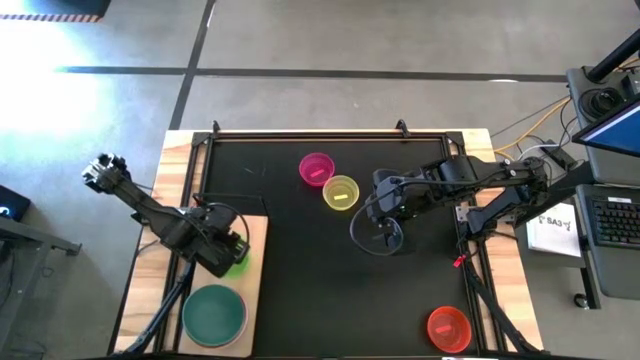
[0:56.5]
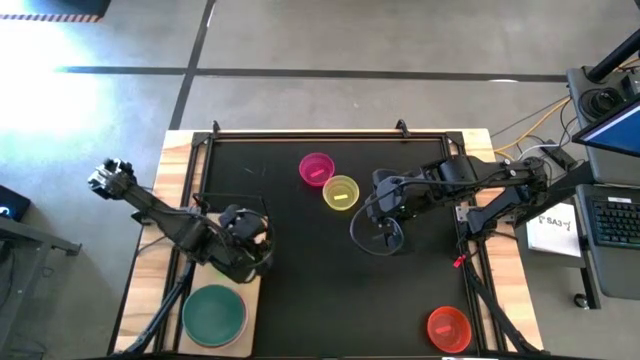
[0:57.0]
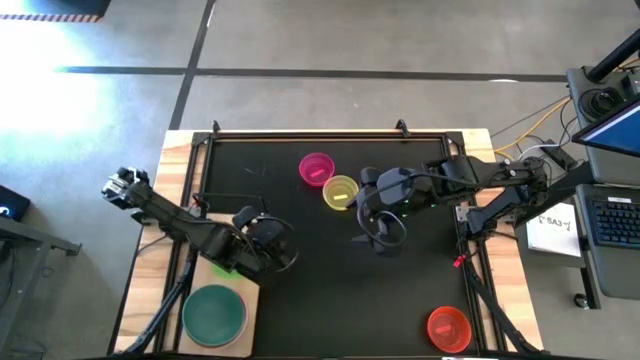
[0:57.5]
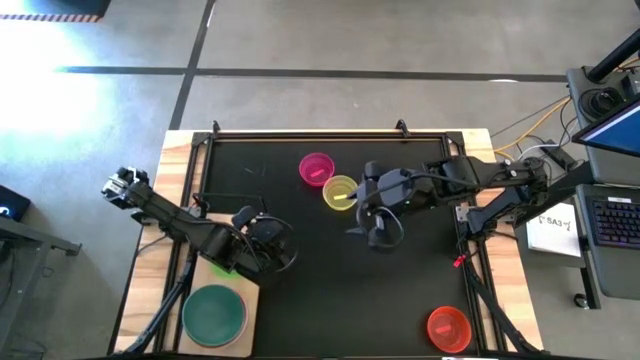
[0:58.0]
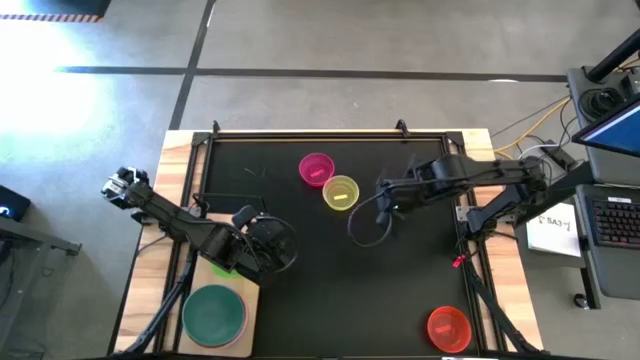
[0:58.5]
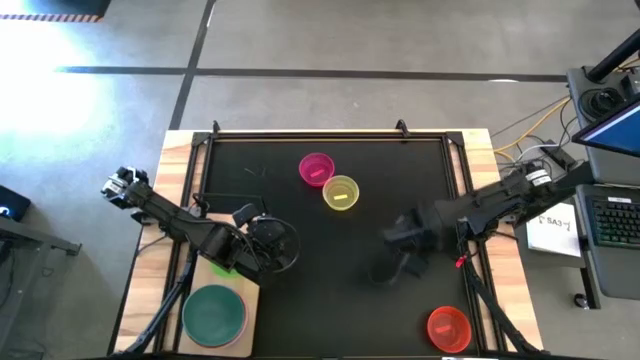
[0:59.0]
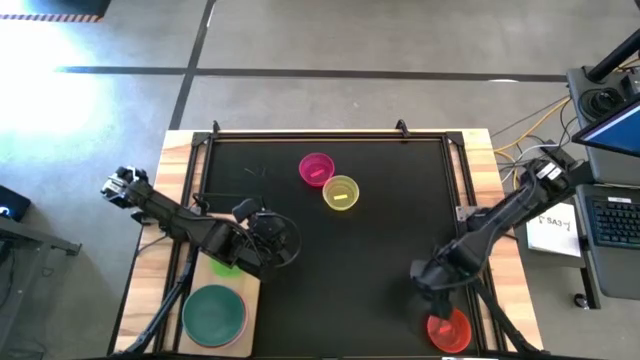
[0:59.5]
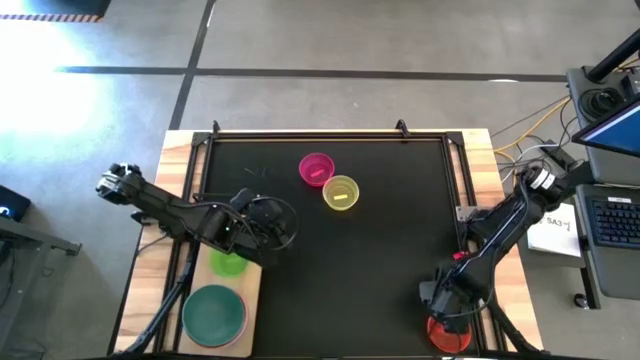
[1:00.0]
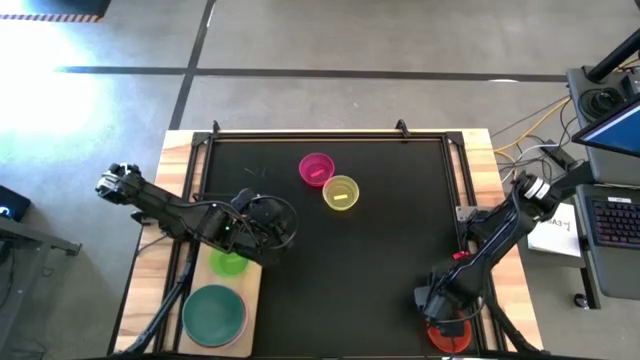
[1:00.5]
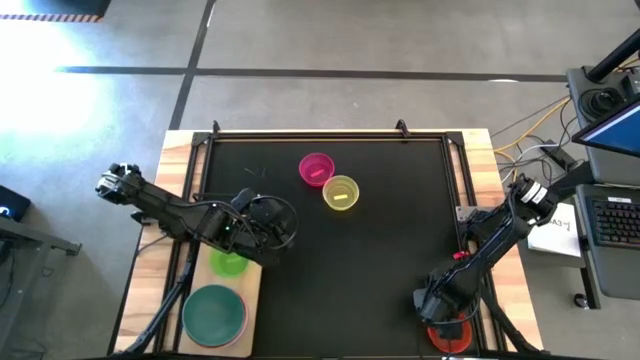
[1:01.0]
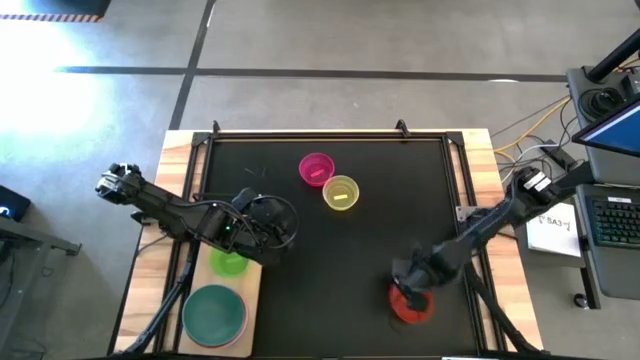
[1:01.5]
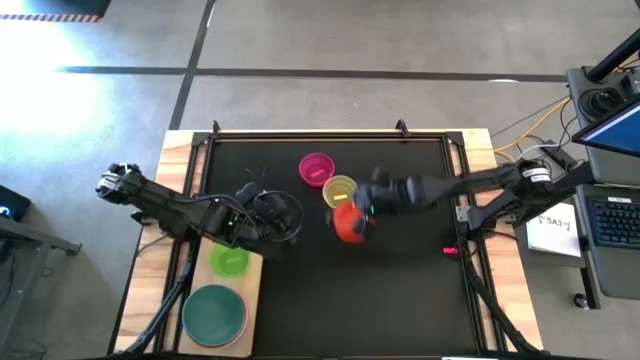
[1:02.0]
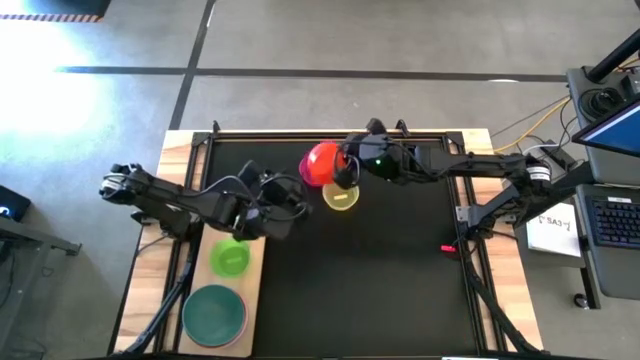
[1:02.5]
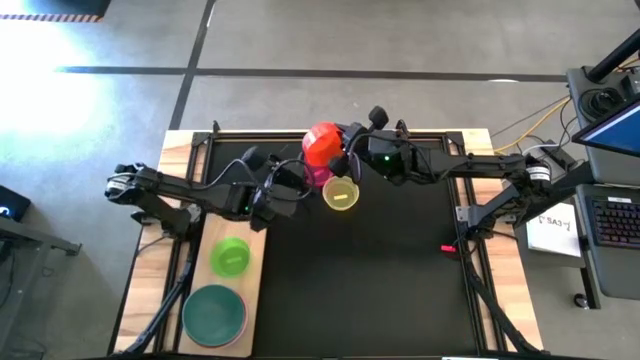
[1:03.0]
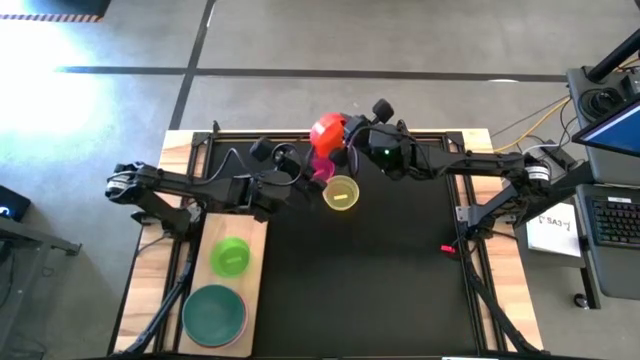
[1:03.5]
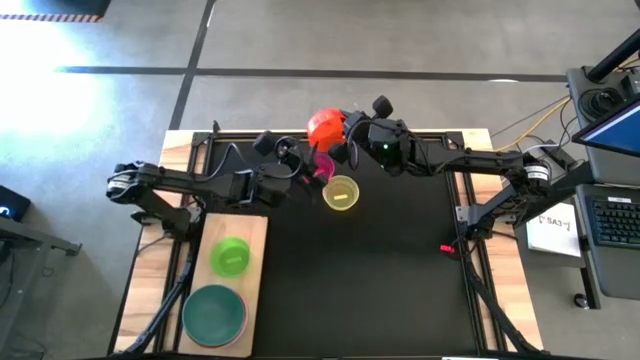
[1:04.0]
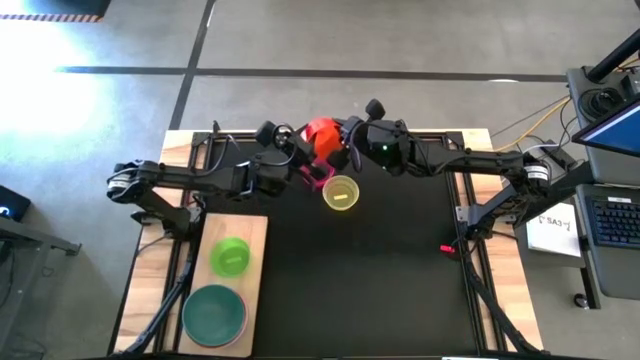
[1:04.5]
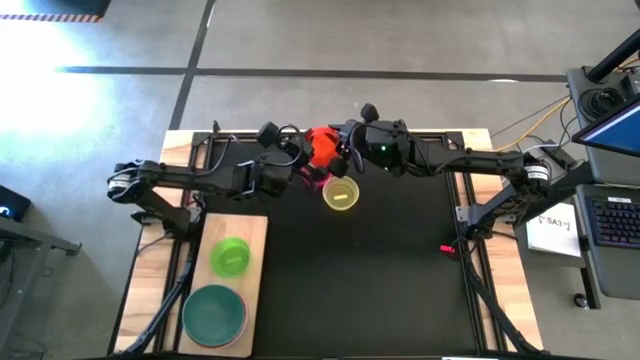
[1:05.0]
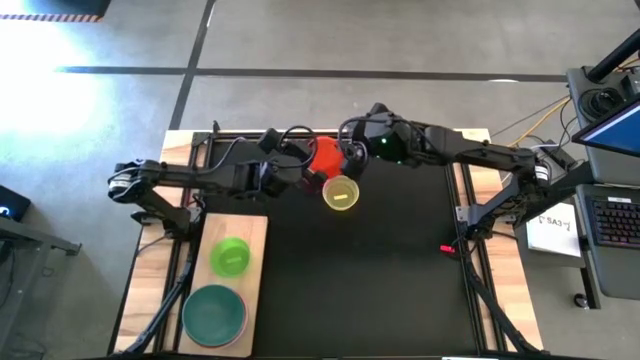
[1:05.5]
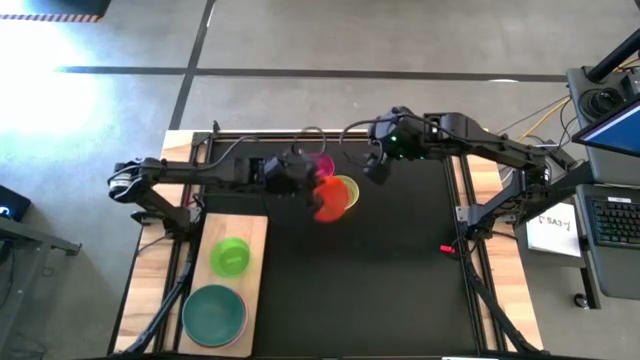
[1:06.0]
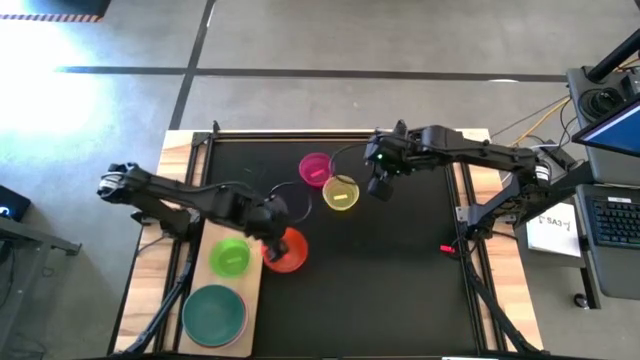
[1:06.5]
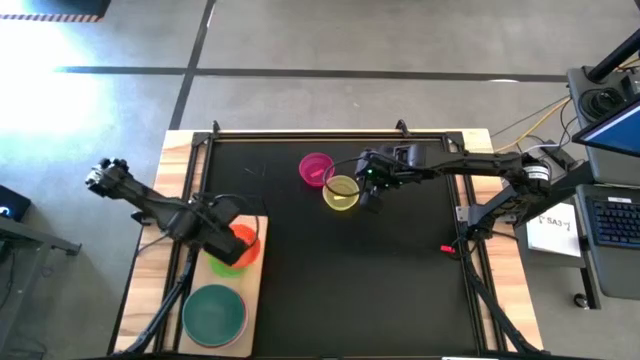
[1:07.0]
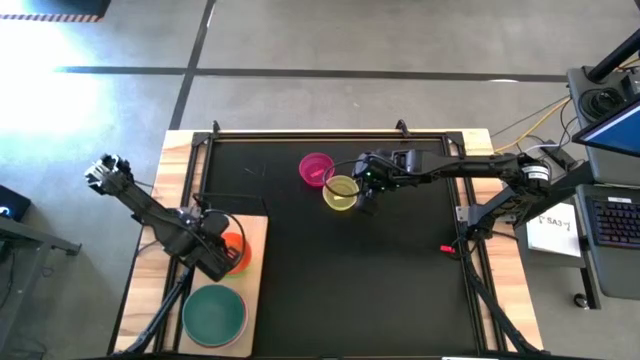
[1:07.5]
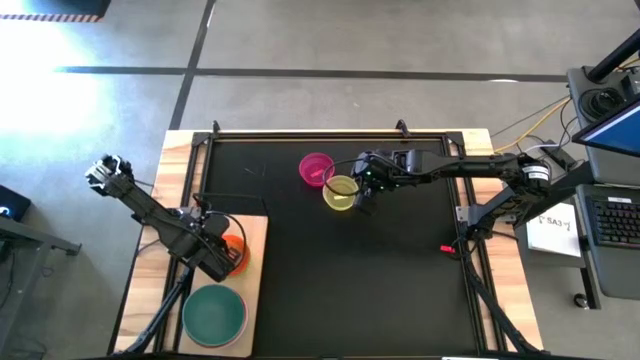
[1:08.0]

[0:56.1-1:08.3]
Task: Place and stack bowls onto a shelf
Stack the orange transparent bowl on top of the green transparent bowl on the shelf

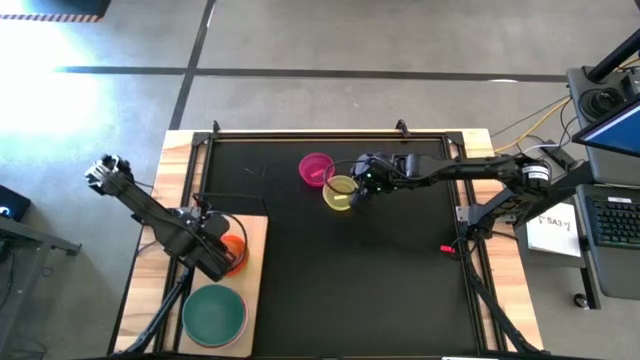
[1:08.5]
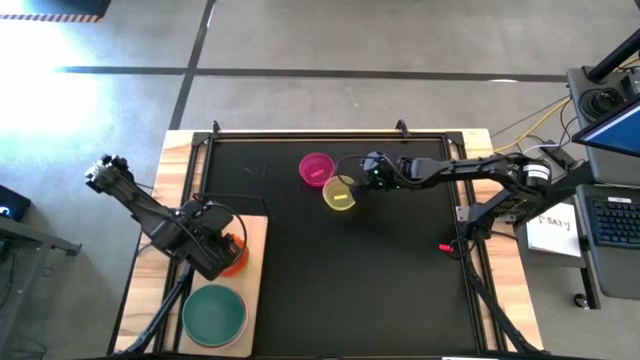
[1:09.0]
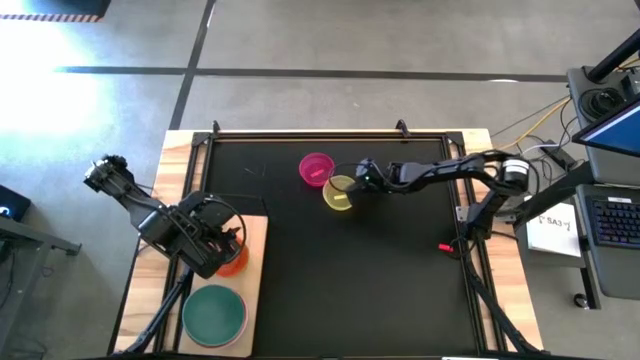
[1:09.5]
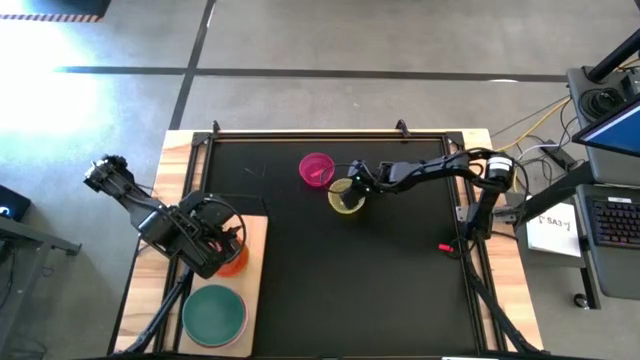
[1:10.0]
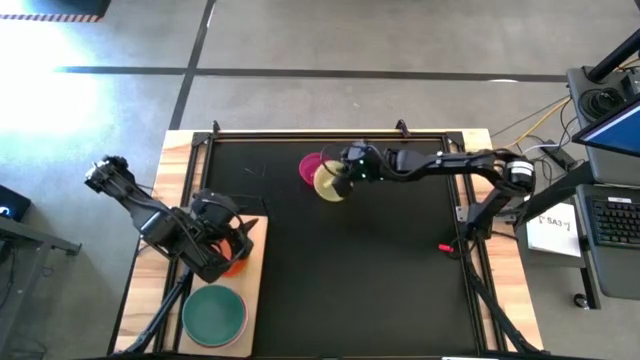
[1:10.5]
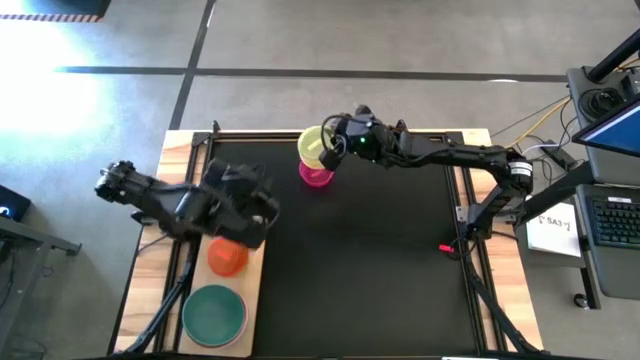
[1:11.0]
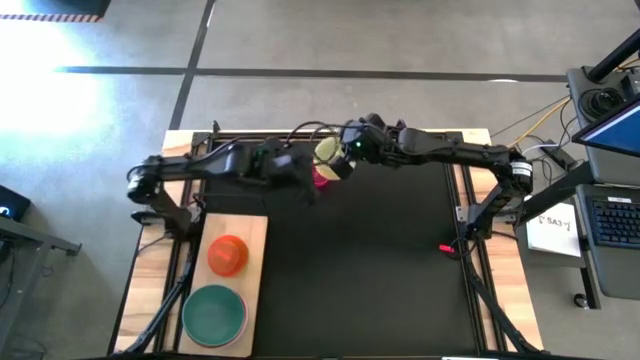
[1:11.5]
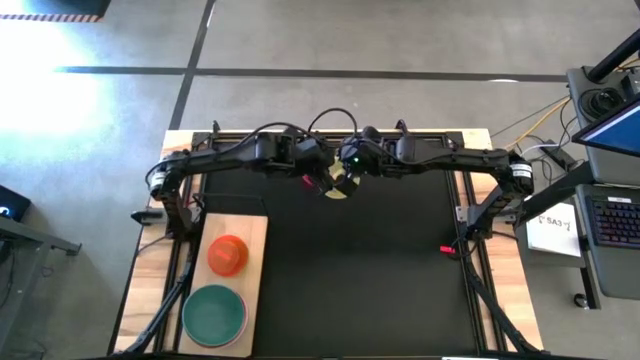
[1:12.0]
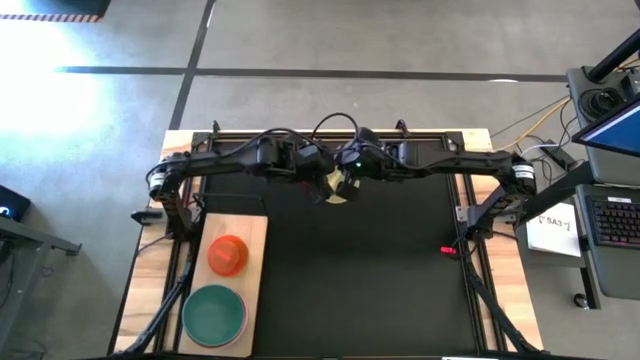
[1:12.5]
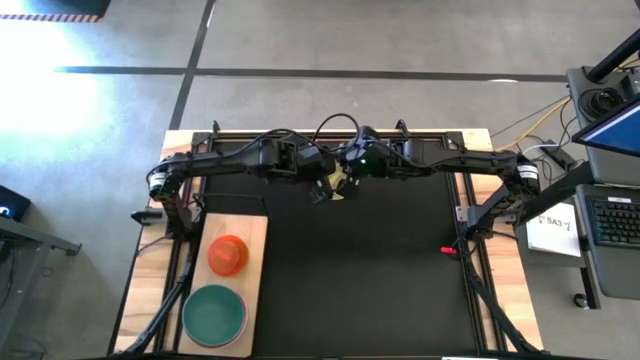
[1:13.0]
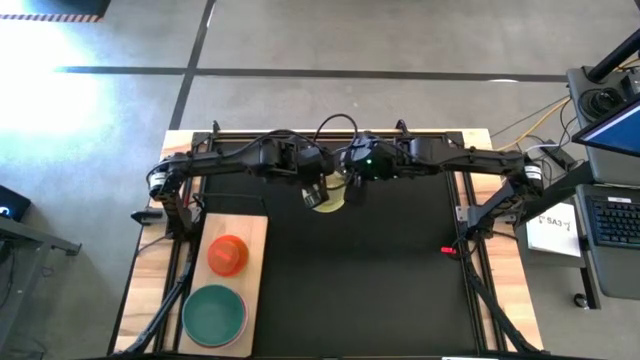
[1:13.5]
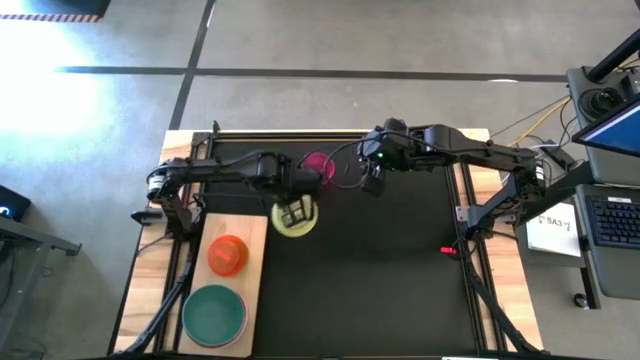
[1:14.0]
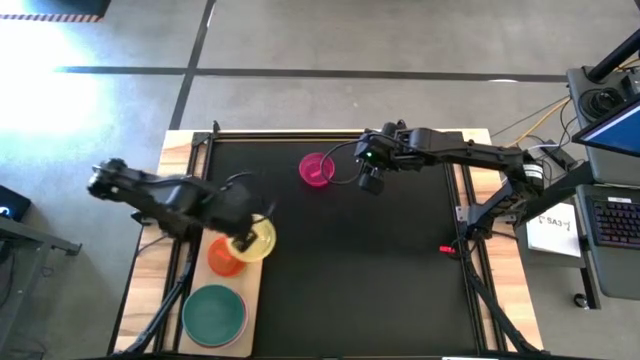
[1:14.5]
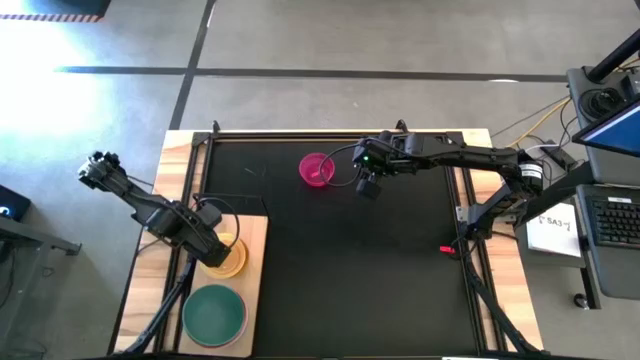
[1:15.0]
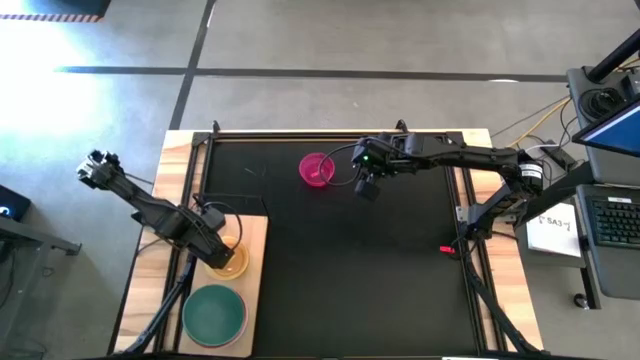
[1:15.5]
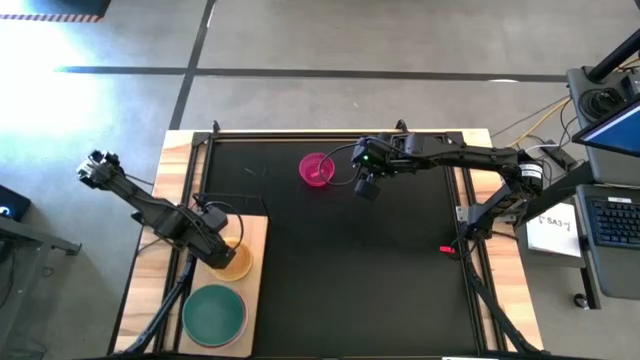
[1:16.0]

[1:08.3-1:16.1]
Stack the yellow transparent bowl on top of the orange transparent bowl on the shelf

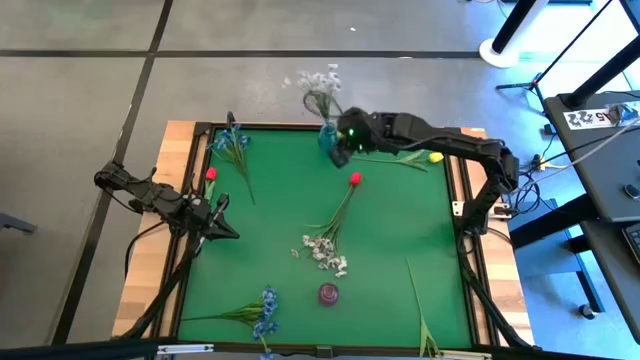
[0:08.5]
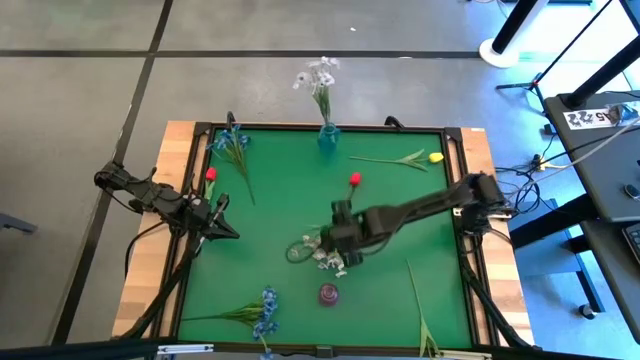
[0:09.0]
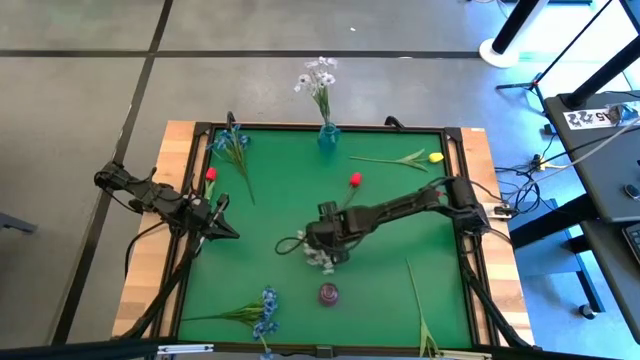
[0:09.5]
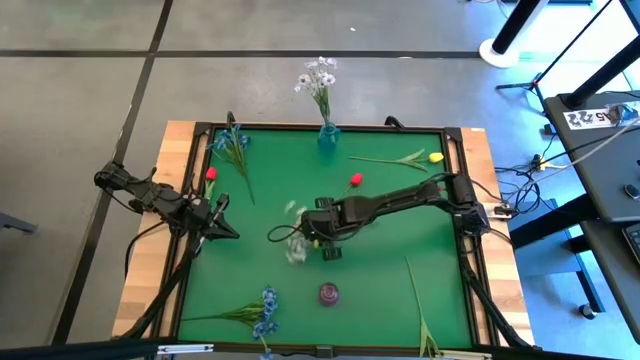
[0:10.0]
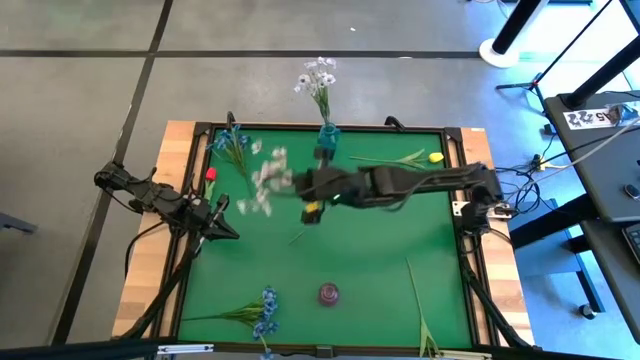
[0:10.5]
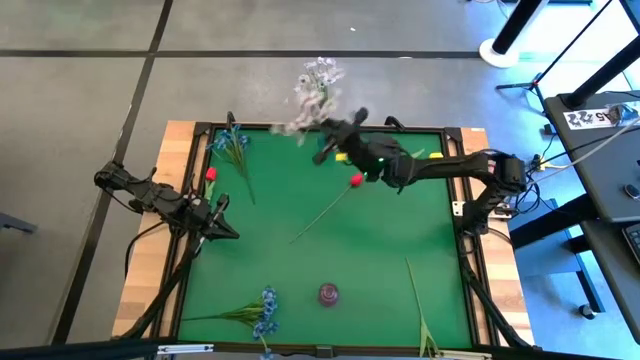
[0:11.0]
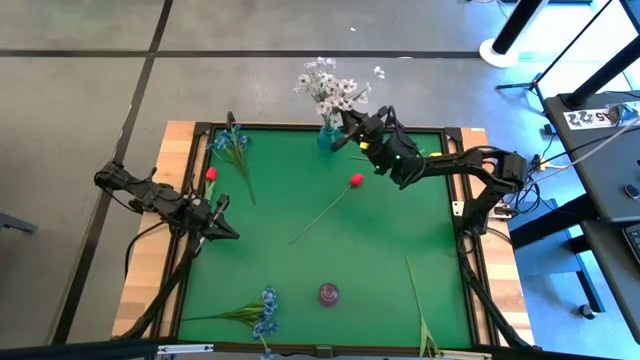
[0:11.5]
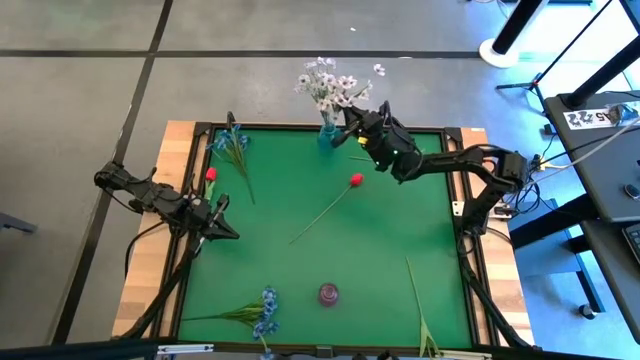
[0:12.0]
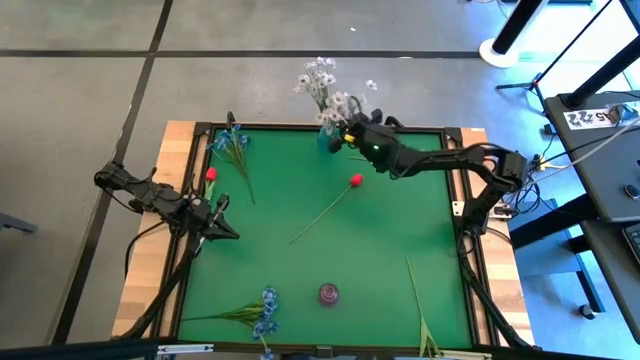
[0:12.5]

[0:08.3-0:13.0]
Task: Sort flowers into vase by color
Put the white flowers into the blue flower vase
